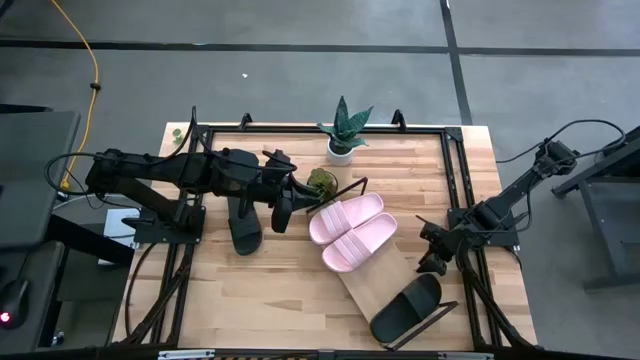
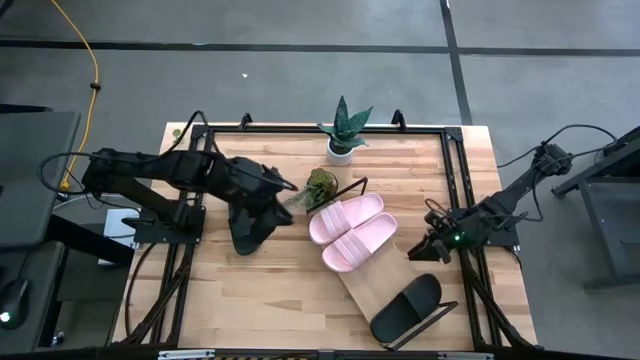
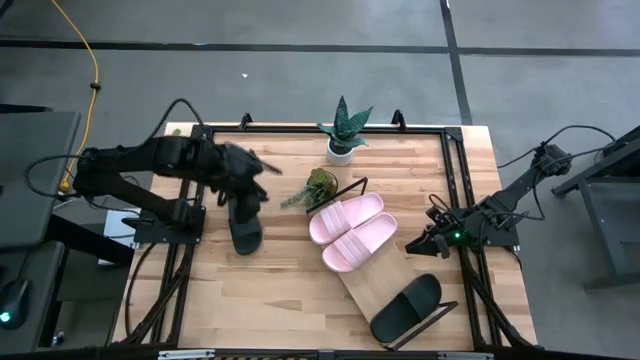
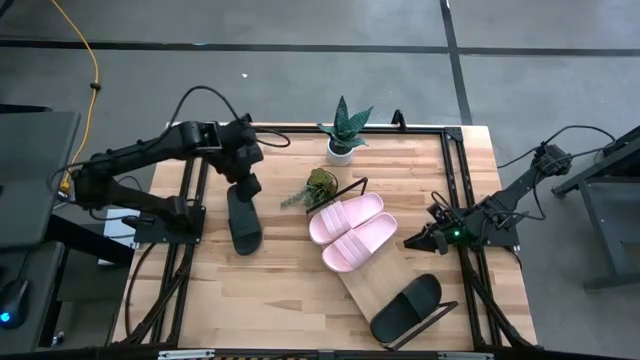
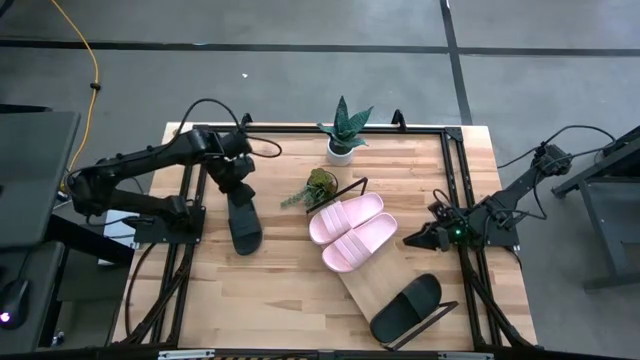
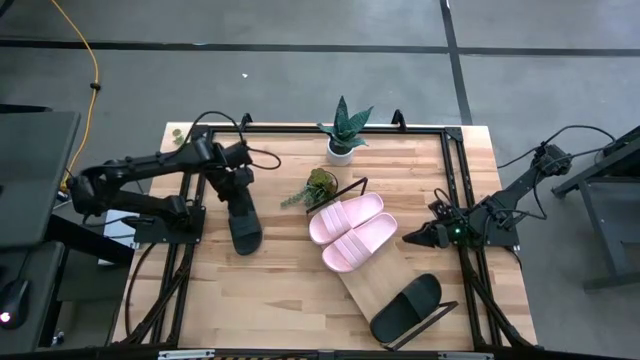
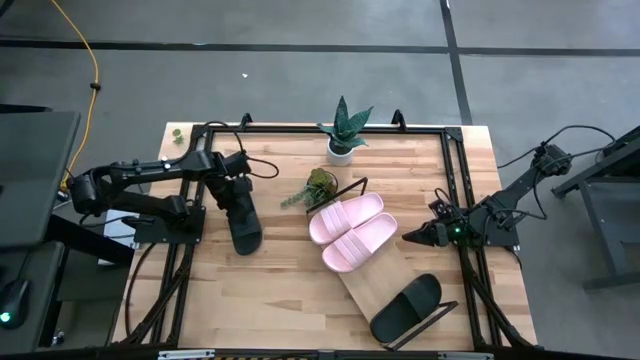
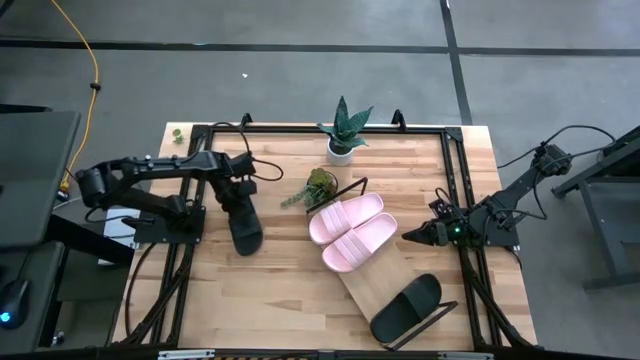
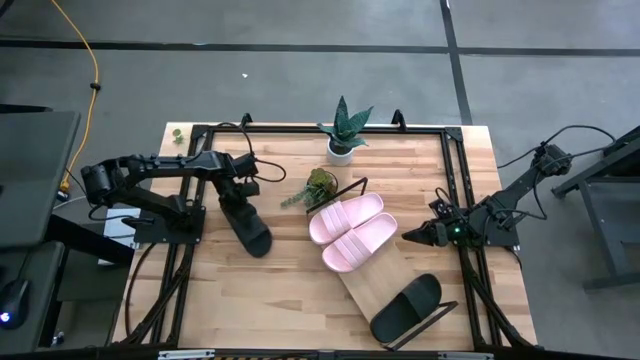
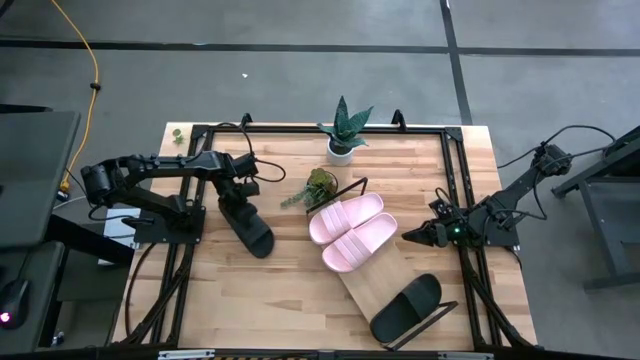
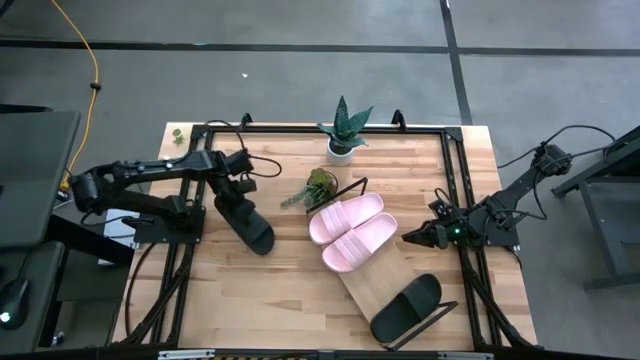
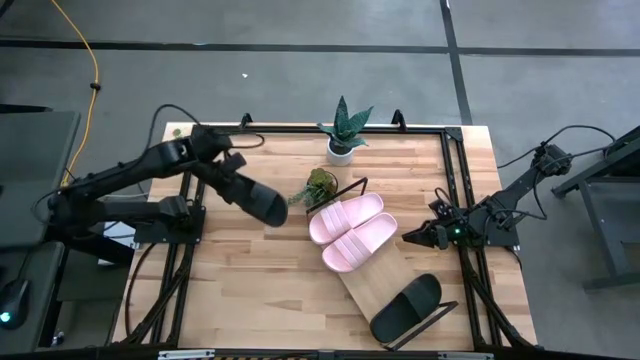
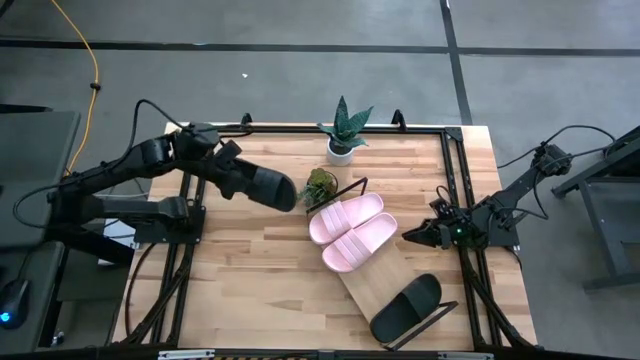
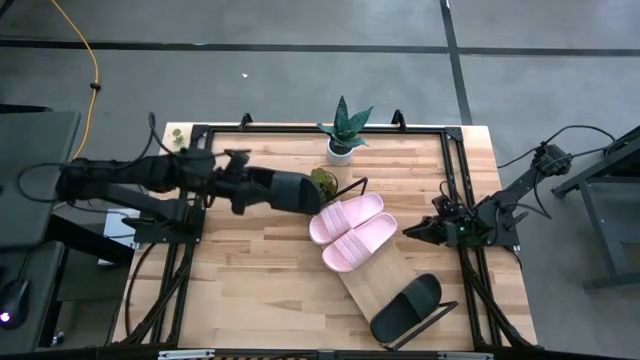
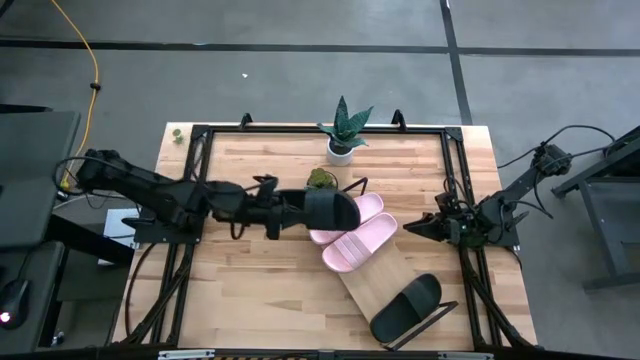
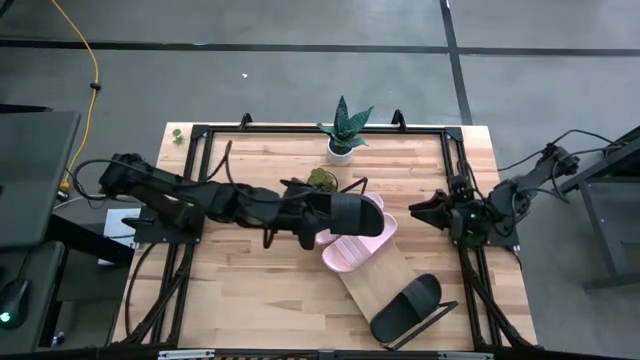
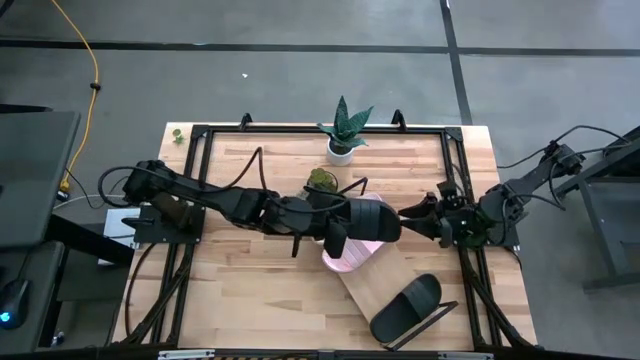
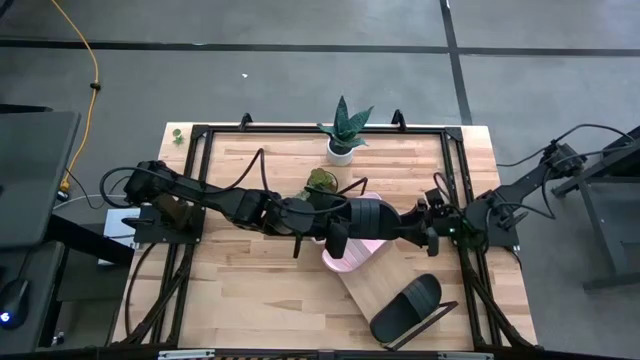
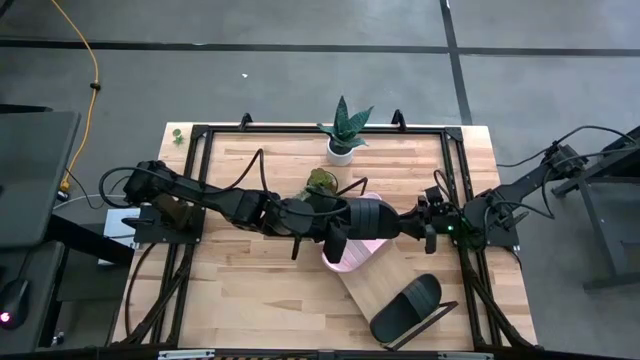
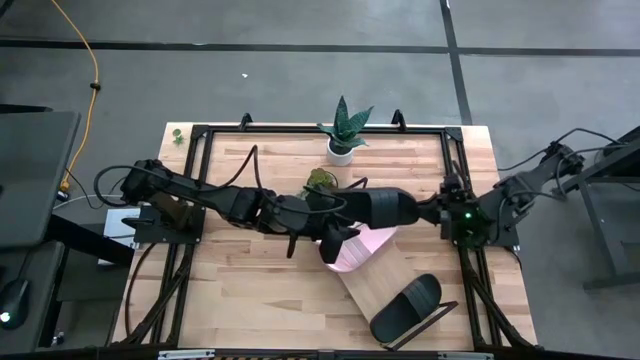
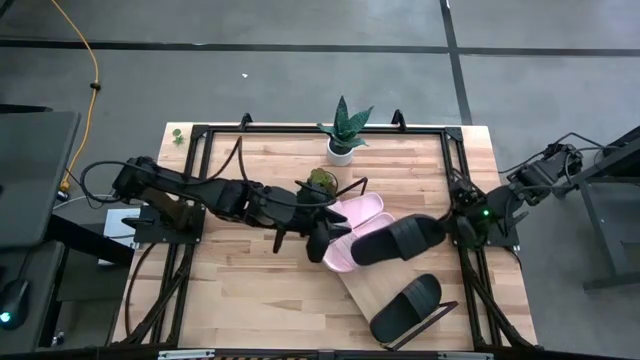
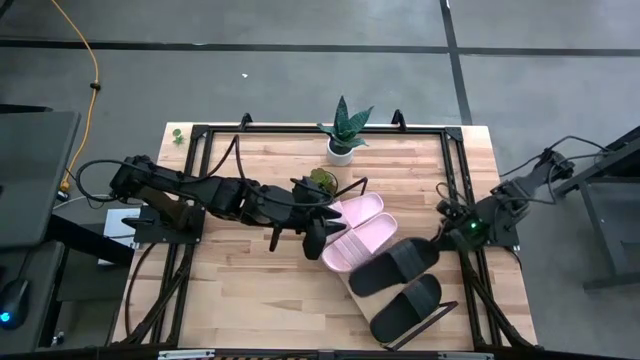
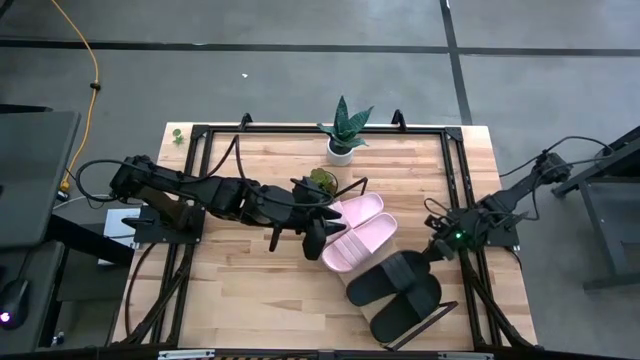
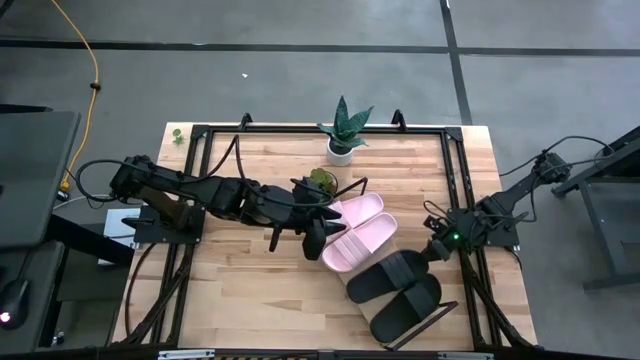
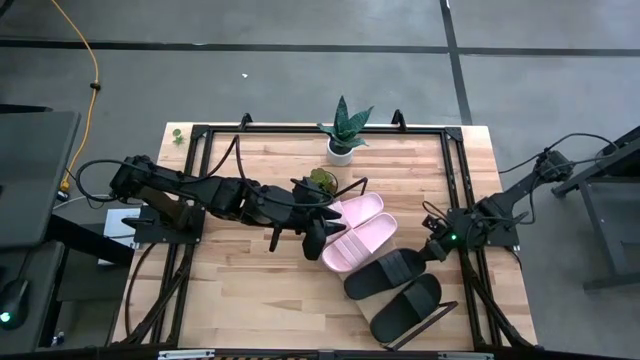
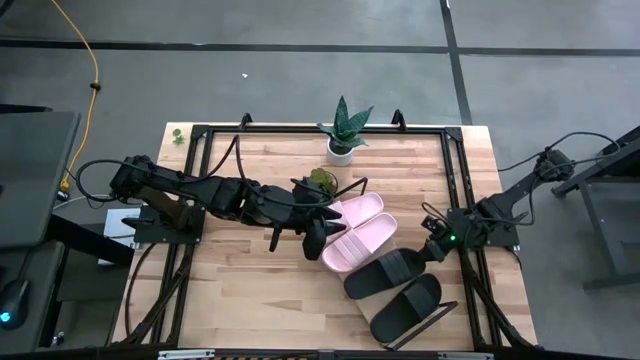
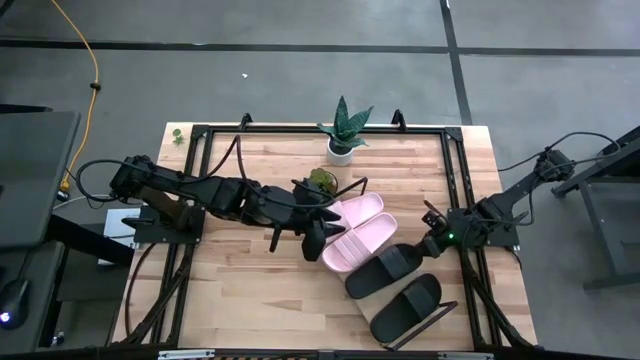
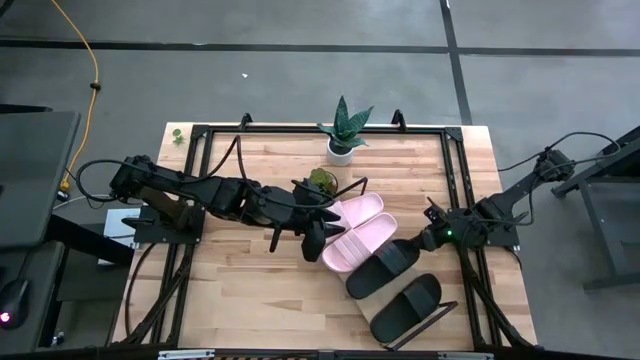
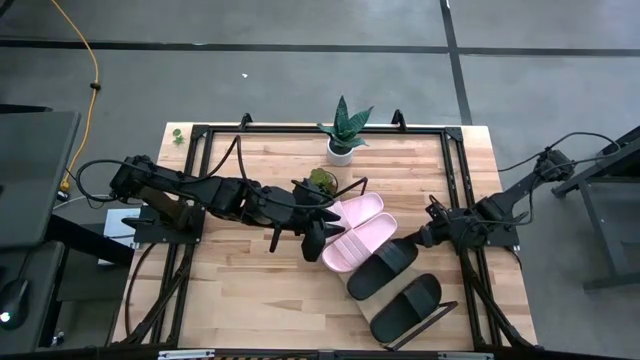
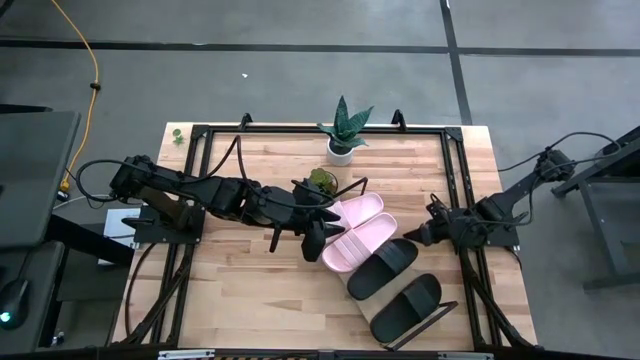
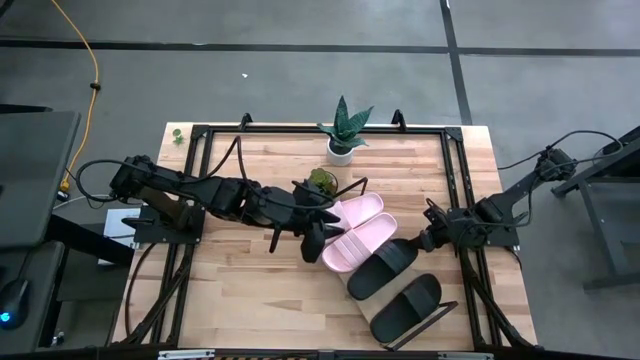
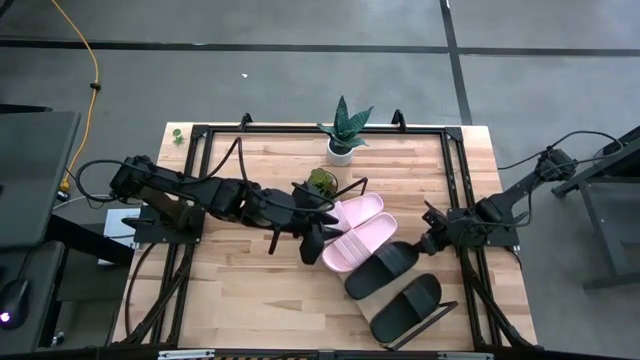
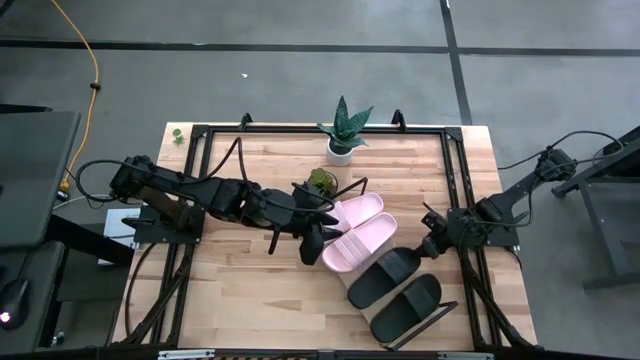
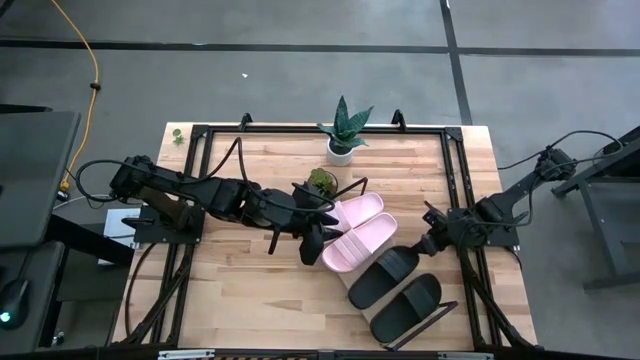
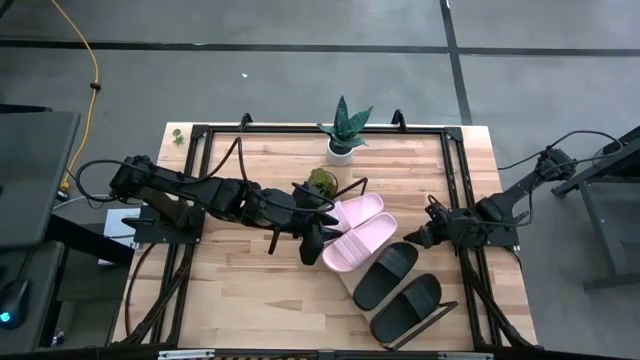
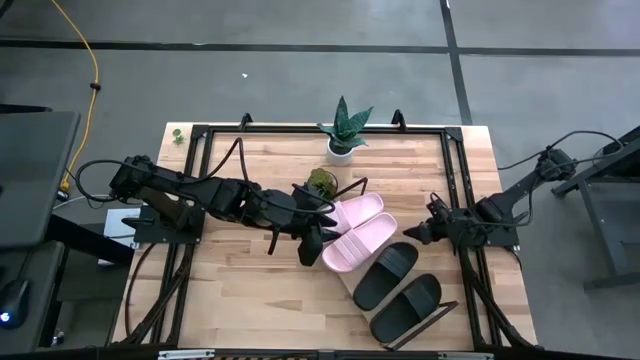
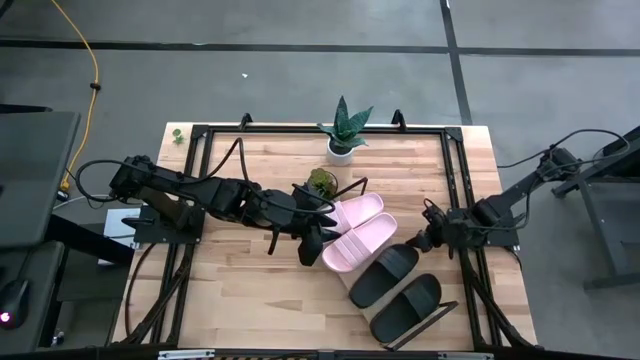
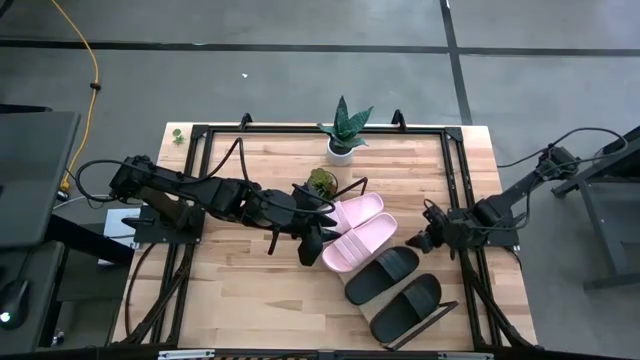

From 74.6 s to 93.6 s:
Task: Pick and place slides into the shelf
Put the black slipper on the shelf

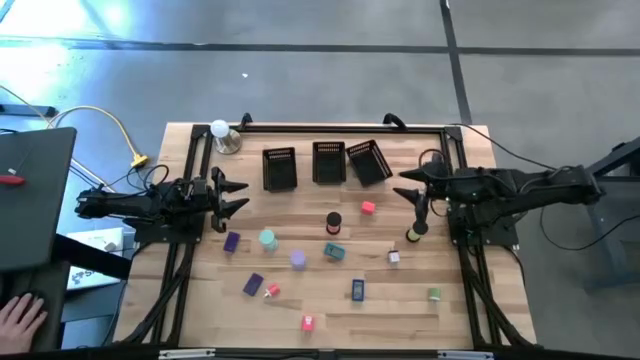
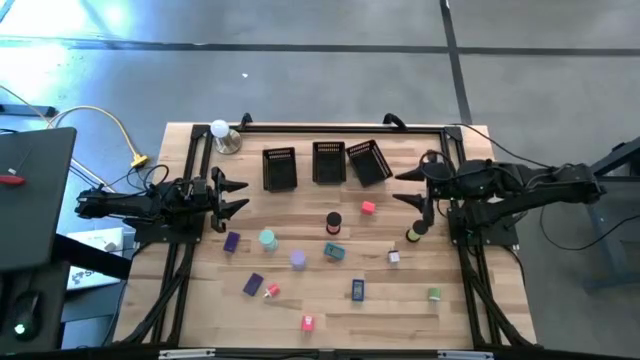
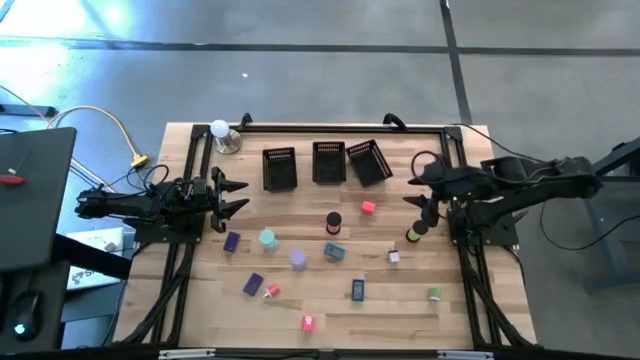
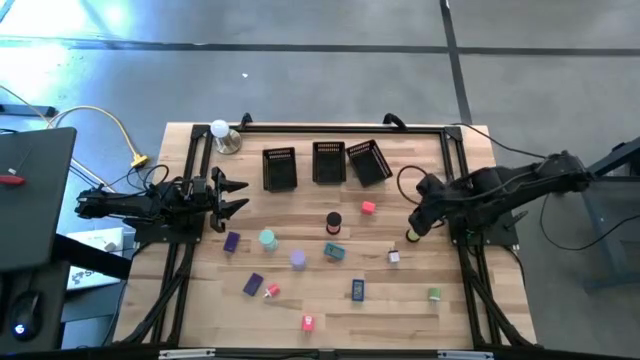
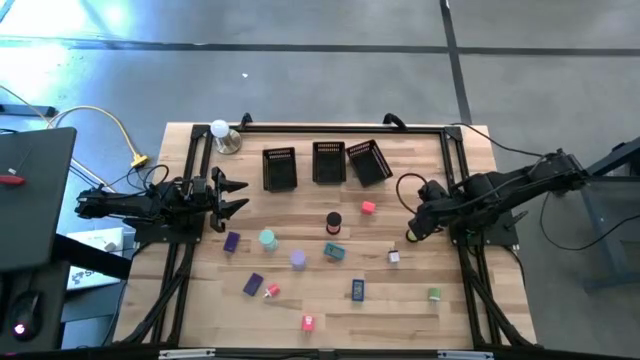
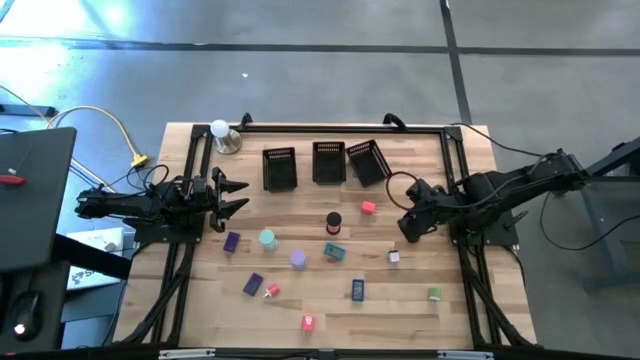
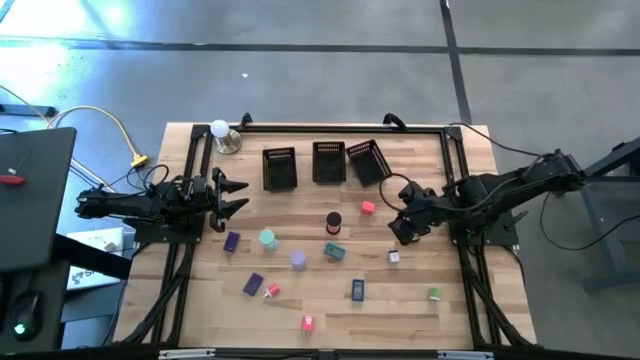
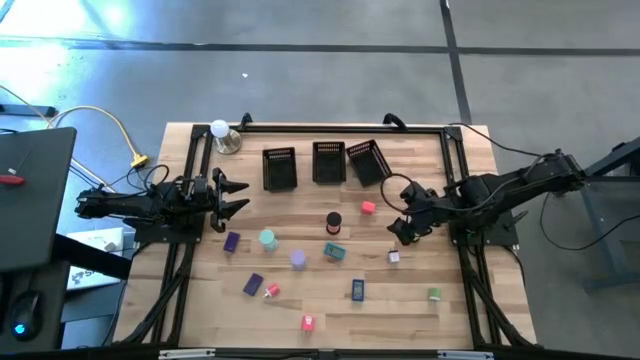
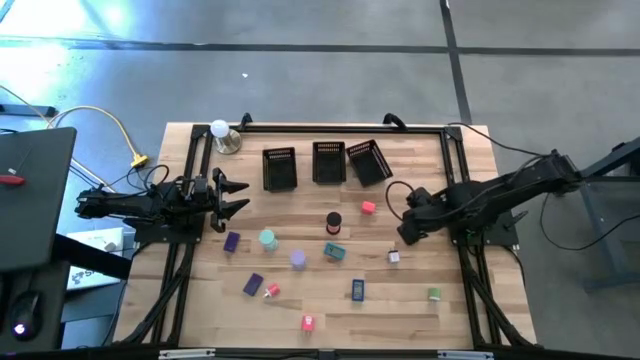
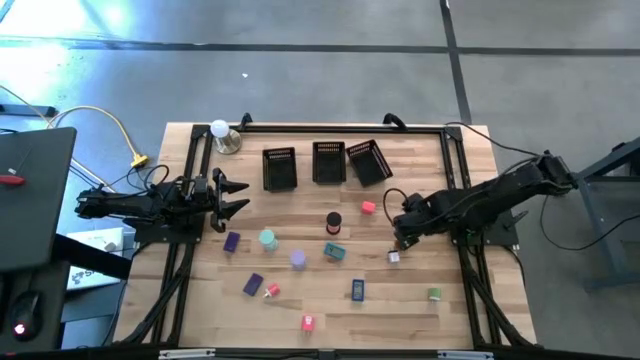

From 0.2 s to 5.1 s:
Task: Pick & Place Office items
Put the light green hourglass into the left black bin
